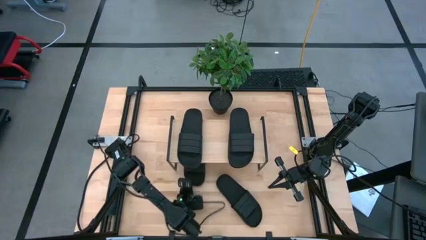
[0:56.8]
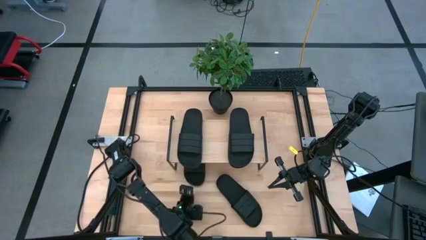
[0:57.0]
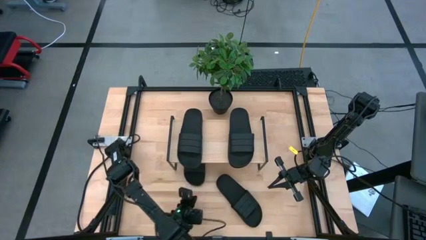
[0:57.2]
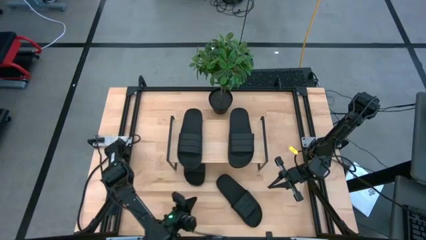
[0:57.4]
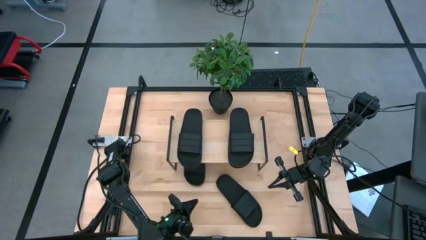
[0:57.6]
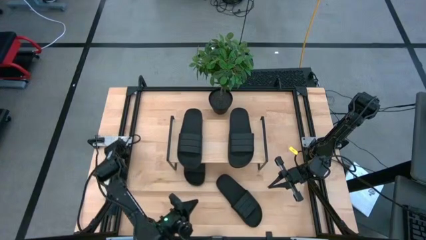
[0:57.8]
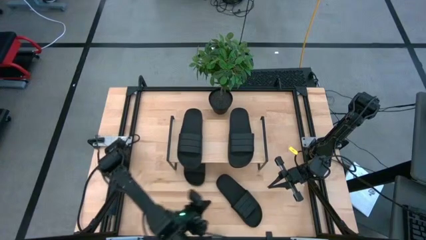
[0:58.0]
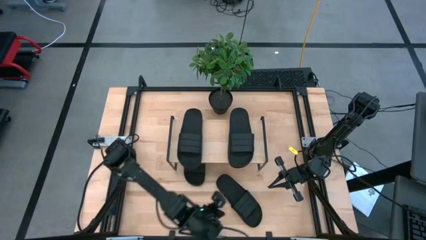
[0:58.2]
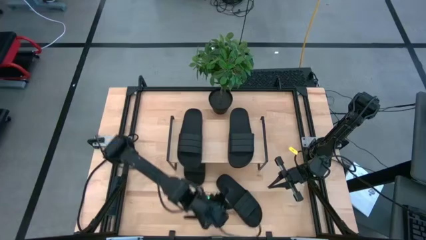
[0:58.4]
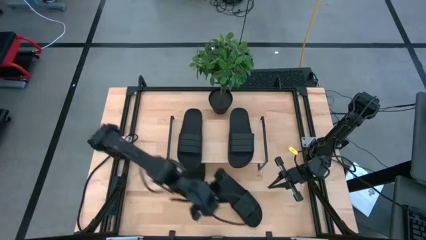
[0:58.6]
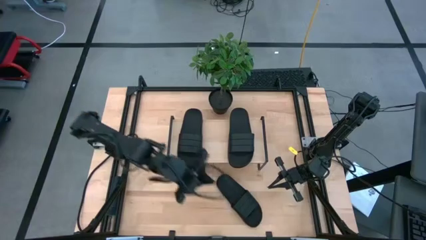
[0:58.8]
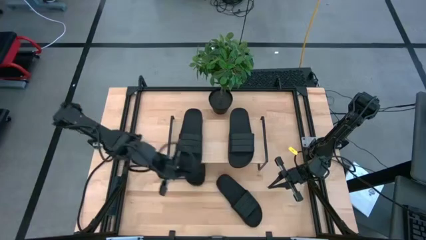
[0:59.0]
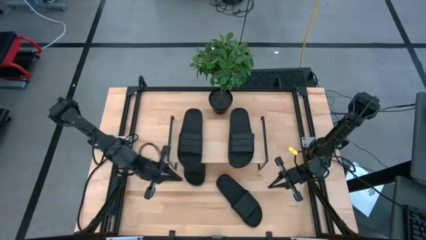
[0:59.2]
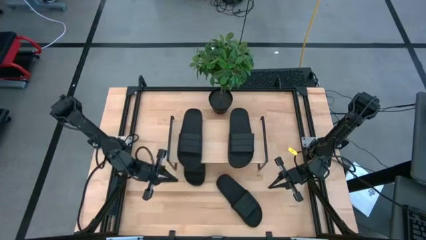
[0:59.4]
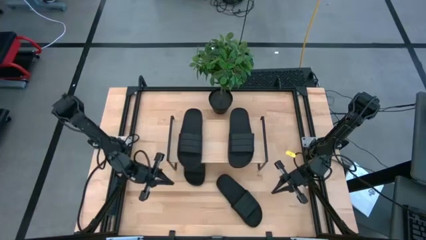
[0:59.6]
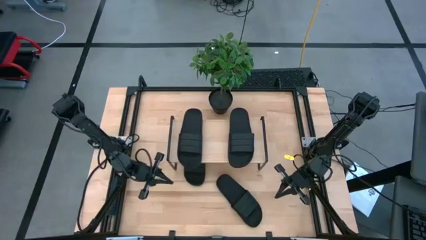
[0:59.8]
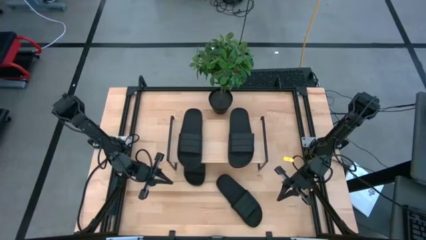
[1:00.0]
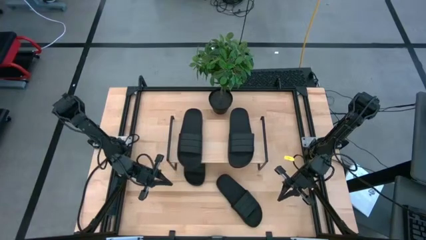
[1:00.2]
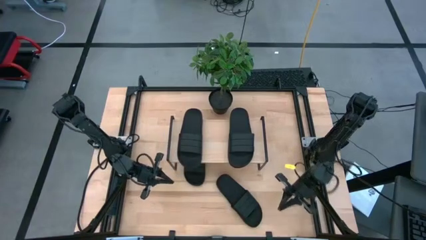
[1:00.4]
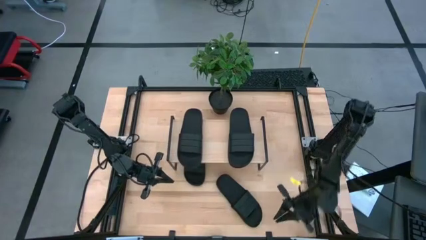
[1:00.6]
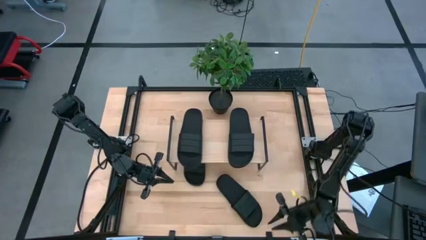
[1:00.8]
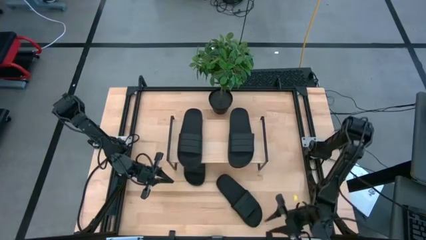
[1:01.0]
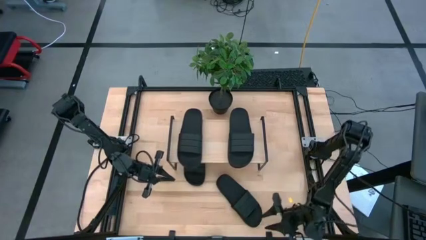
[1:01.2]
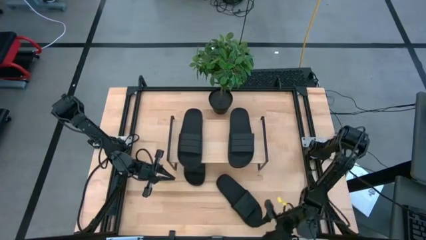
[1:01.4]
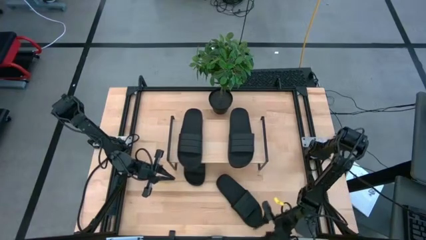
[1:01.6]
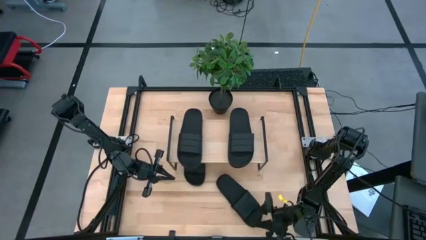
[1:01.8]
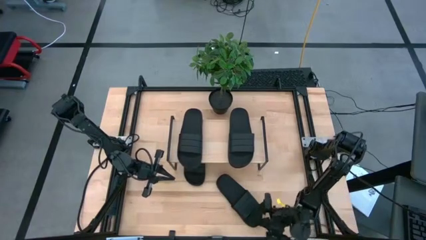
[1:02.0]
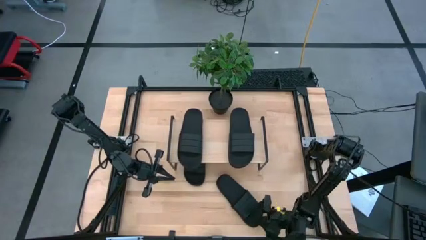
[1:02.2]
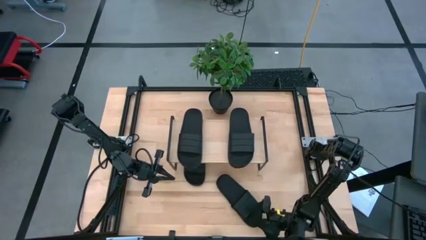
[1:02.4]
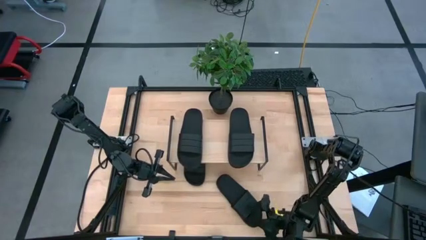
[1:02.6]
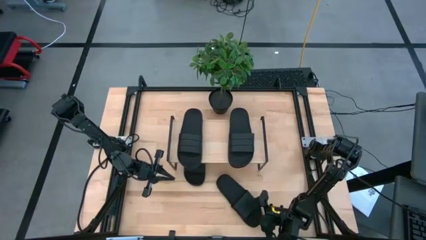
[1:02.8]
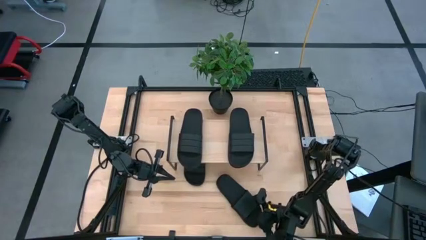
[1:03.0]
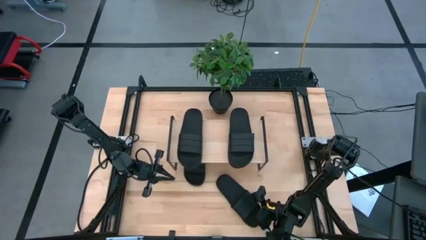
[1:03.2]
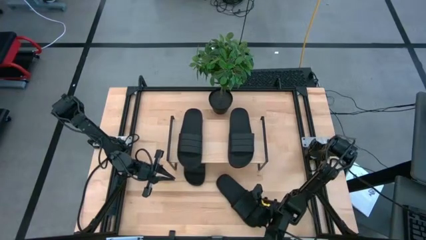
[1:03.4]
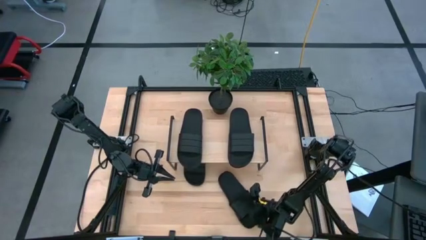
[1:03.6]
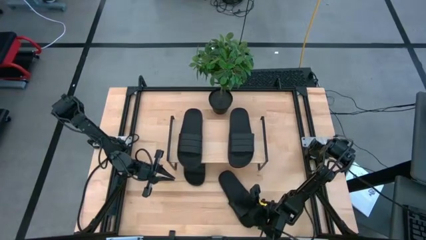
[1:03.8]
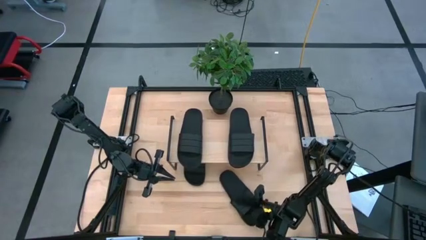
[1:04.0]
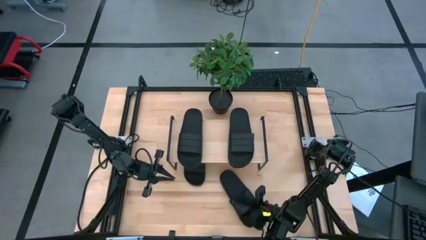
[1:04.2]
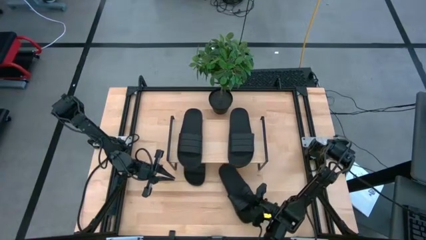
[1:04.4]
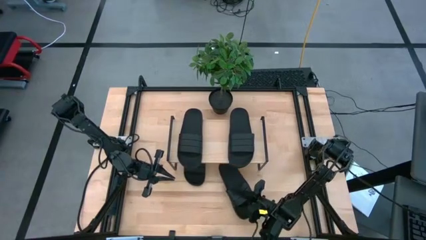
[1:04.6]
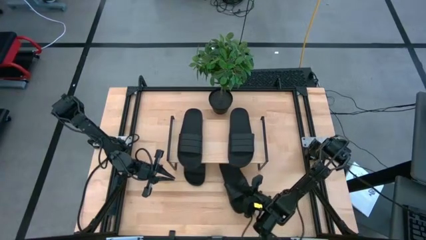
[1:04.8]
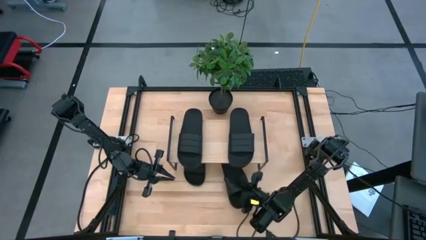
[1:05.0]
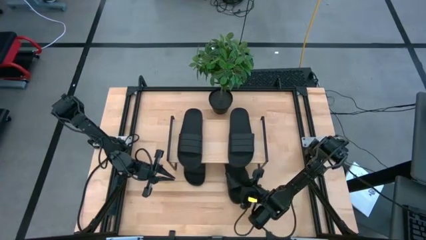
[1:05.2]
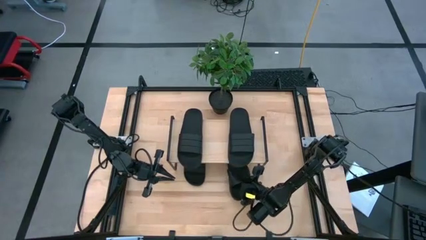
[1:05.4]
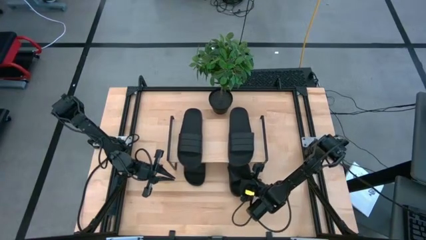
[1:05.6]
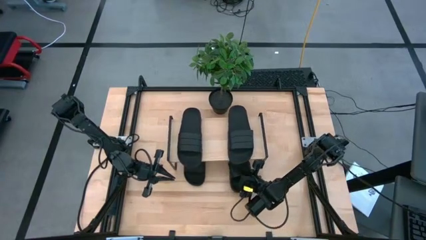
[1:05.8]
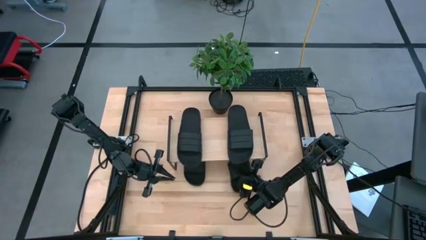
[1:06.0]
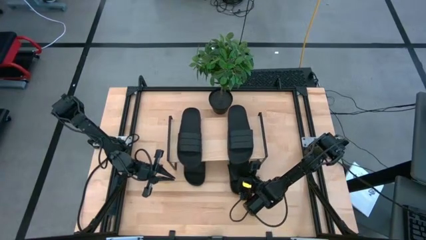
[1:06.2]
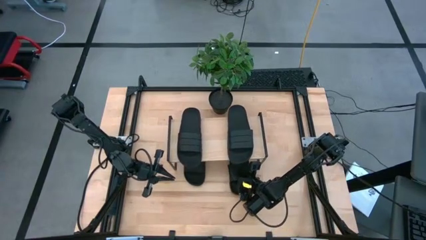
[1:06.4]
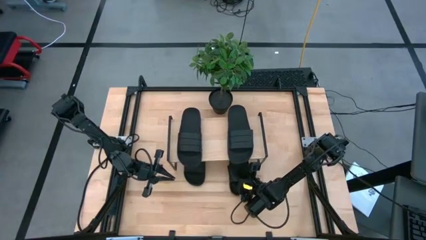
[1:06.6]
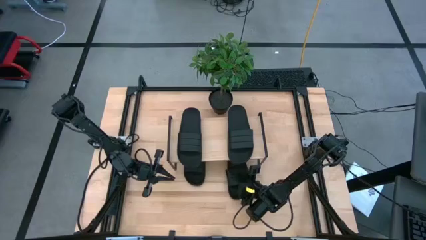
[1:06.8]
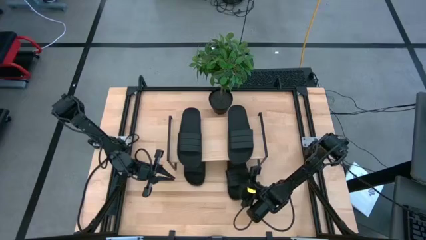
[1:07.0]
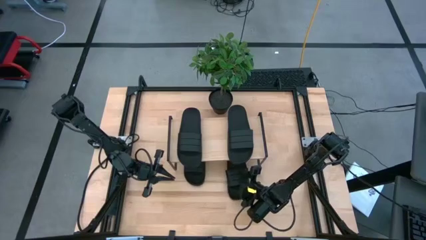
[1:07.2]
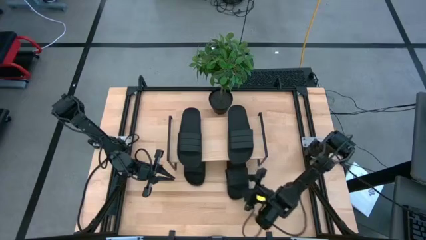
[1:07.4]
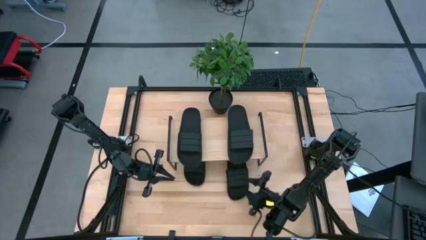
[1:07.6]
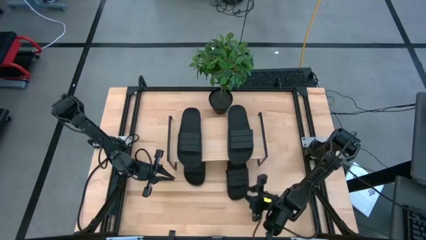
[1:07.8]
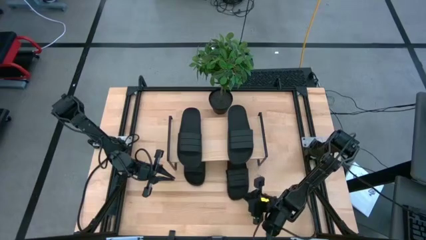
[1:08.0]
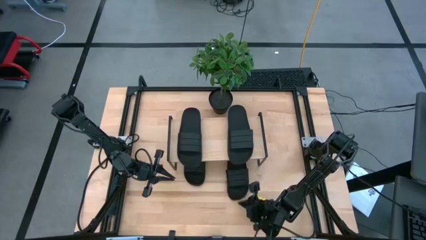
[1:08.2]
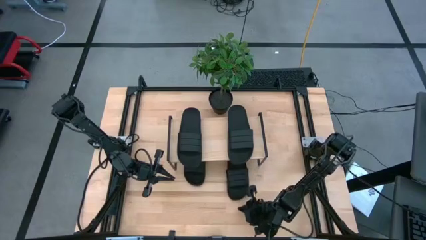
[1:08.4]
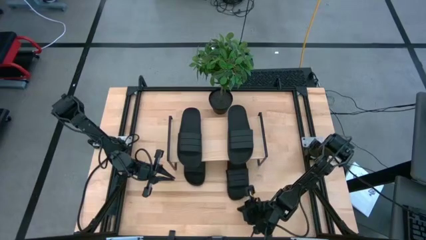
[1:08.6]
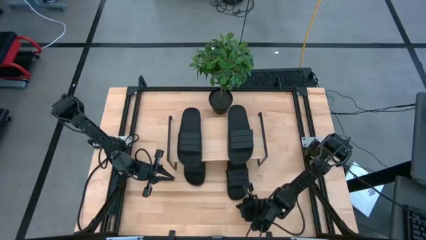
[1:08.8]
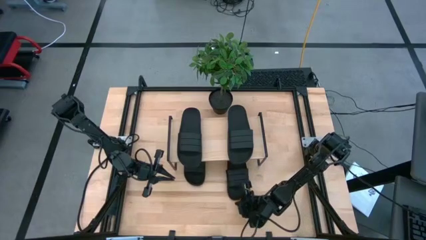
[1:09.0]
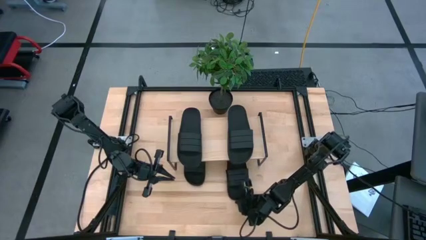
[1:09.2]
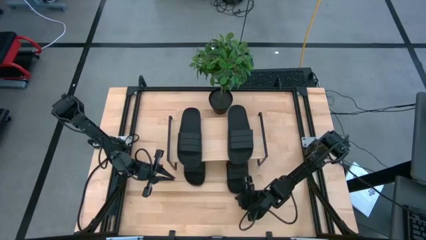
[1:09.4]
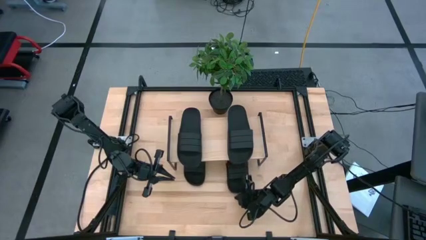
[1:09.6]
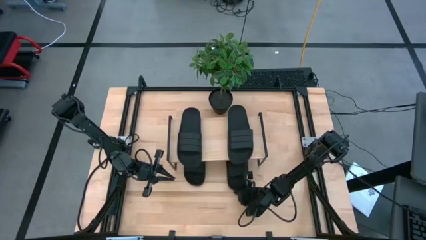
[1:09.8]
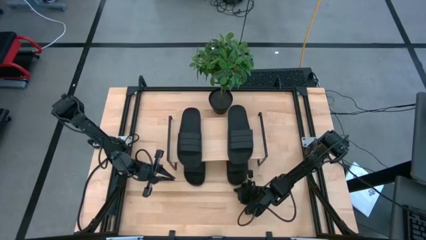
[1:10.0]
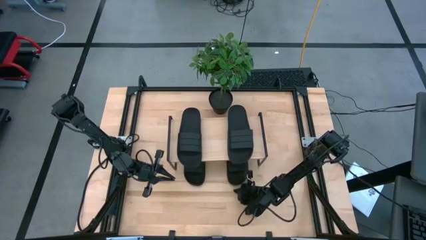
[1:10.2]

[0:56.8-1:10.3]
Task: Pick and place slides into the shelf
Put the black slide under the shelf
